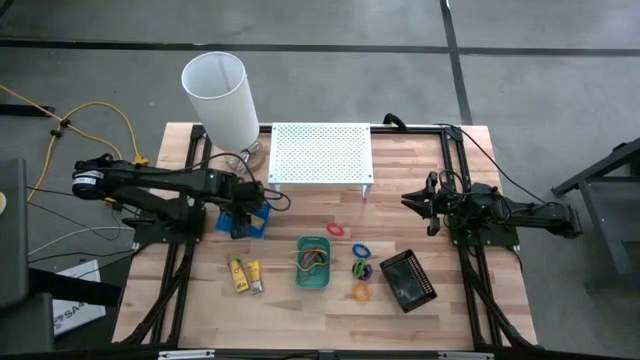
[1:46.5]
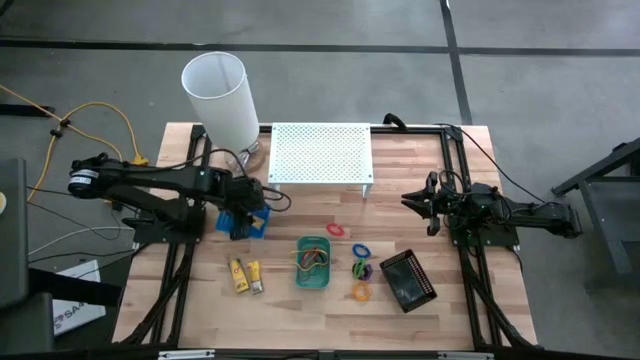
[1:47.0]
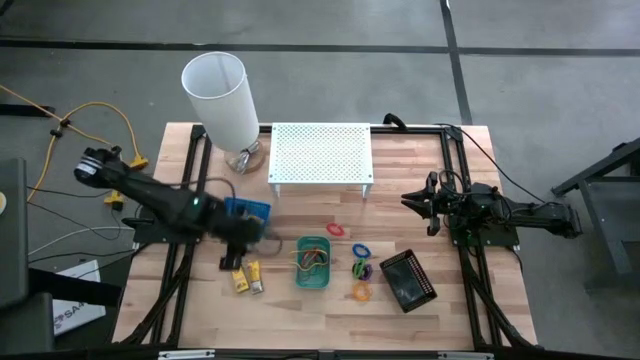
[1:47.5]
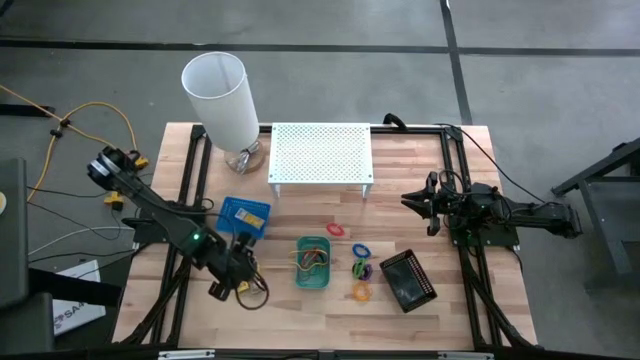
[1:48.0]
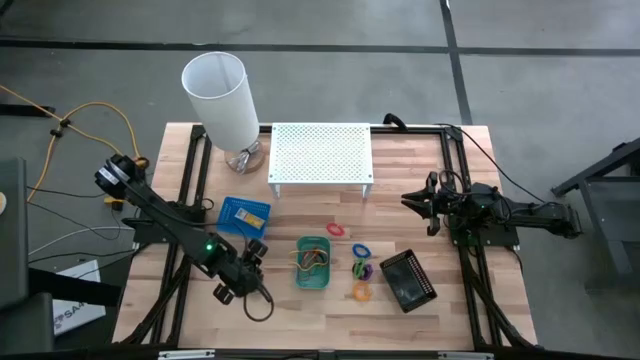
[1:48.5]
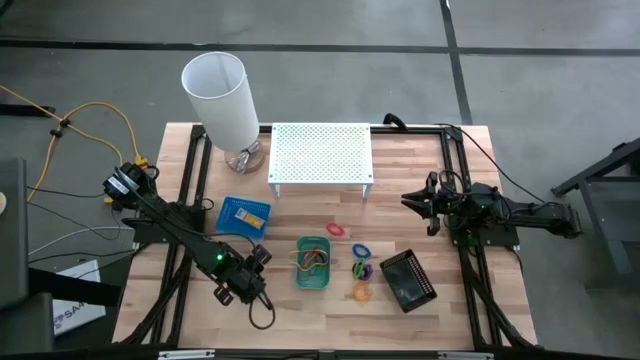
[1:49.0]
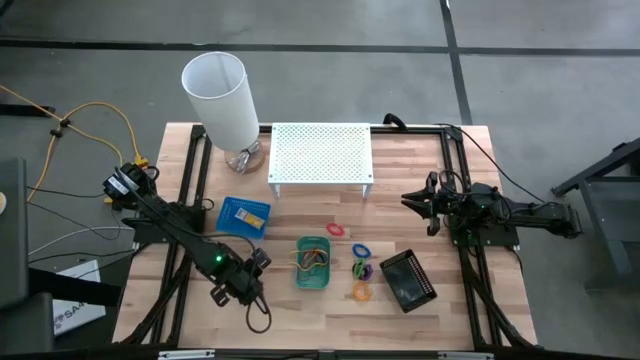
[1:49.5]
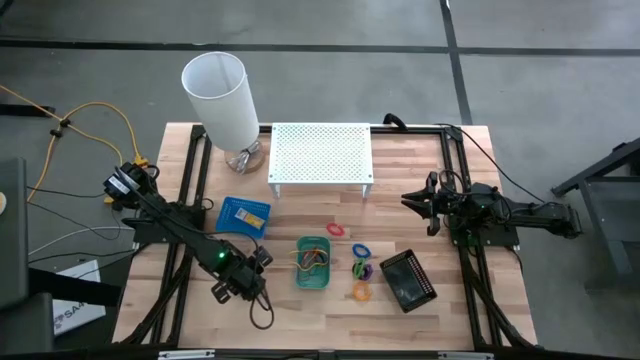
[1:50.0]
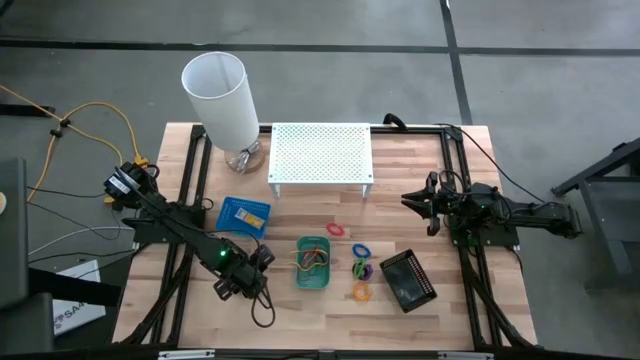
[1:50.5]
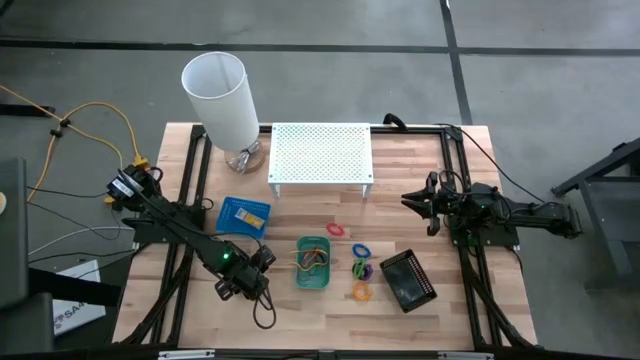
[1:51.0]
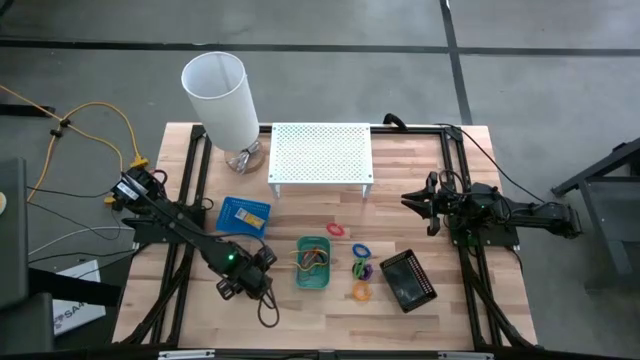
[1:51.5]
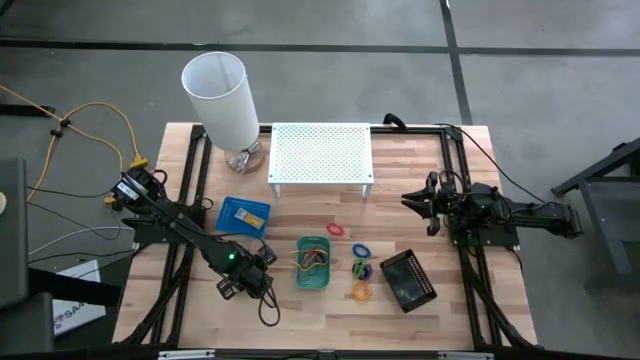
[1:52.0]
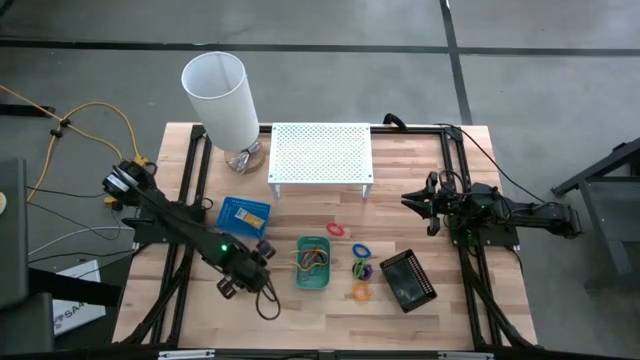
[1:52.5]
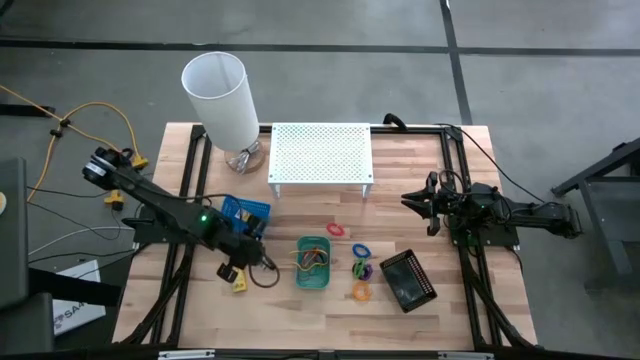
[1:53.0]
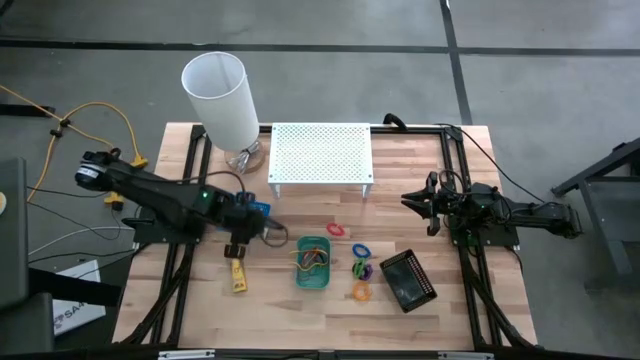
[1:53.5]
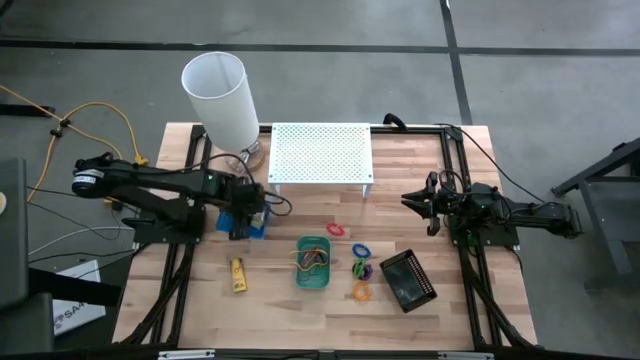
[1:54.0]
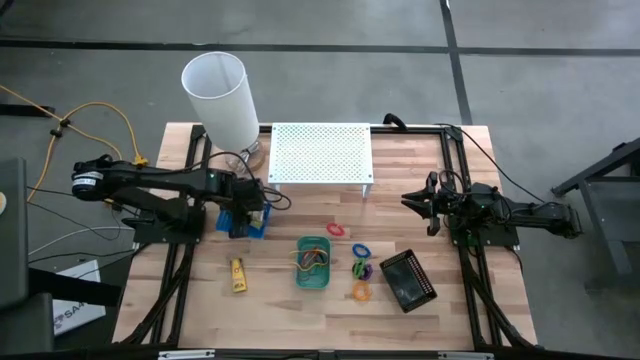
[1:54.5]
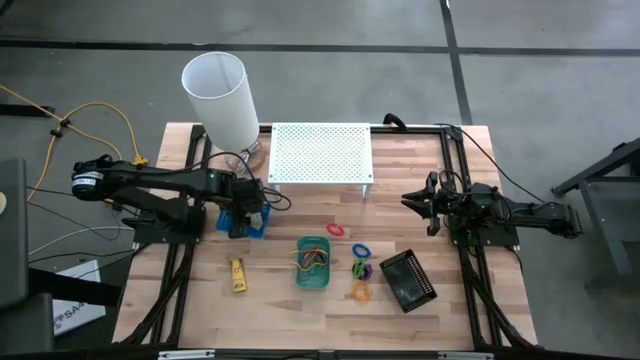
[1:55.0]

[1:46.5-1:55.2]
Task: Pick & Place Office Desk Supplies
Put the yellow crayon box into the blue bin

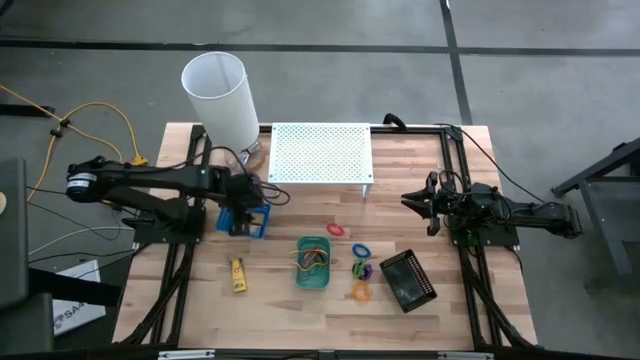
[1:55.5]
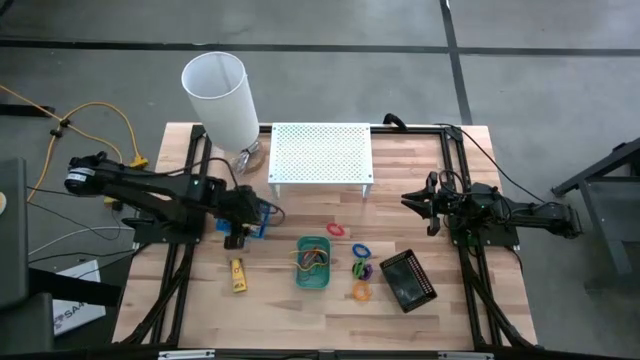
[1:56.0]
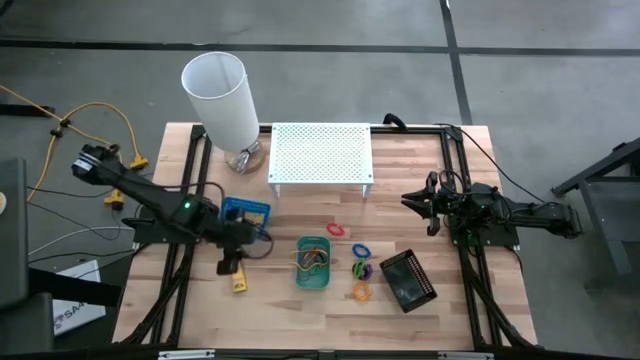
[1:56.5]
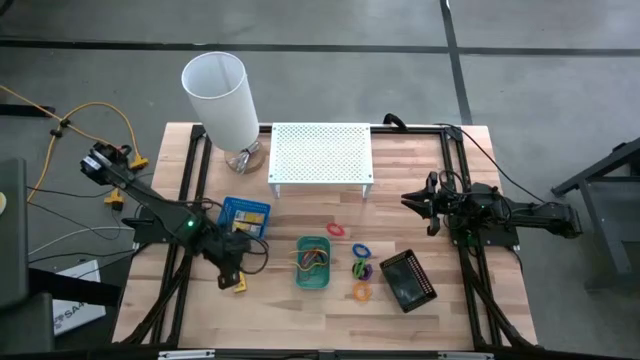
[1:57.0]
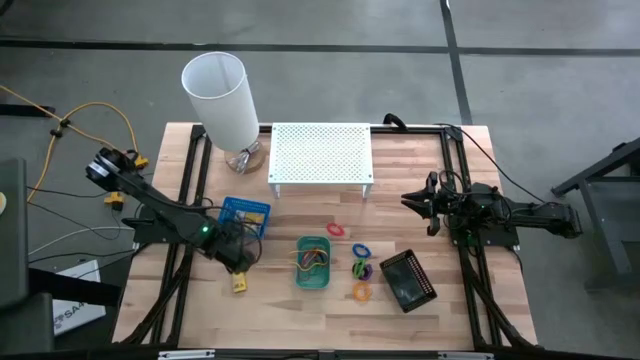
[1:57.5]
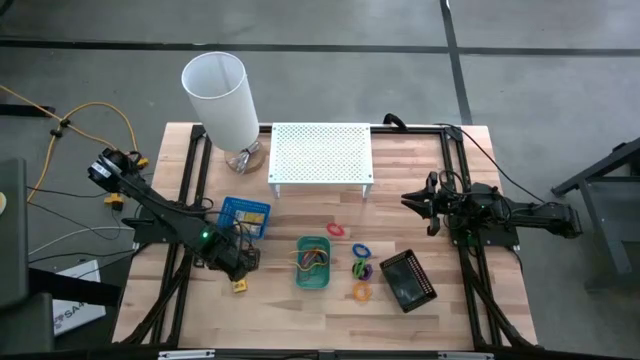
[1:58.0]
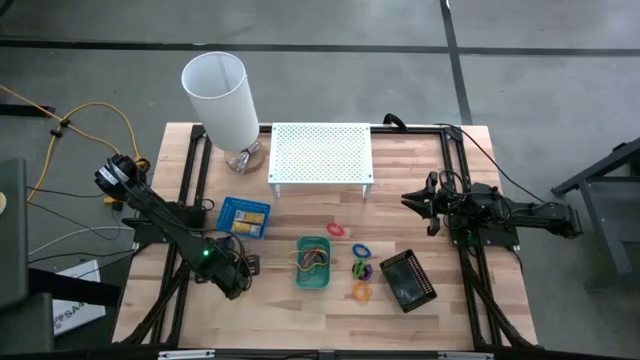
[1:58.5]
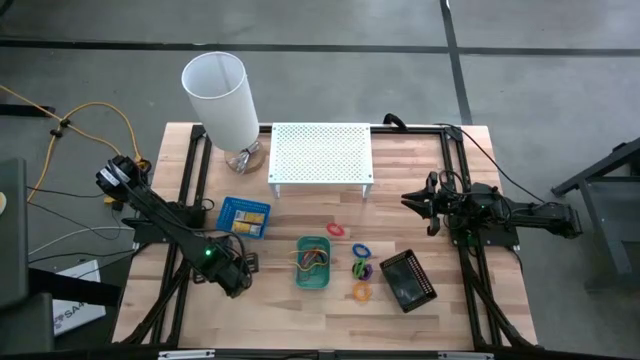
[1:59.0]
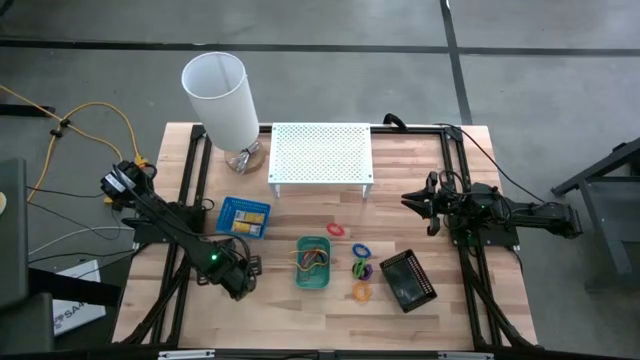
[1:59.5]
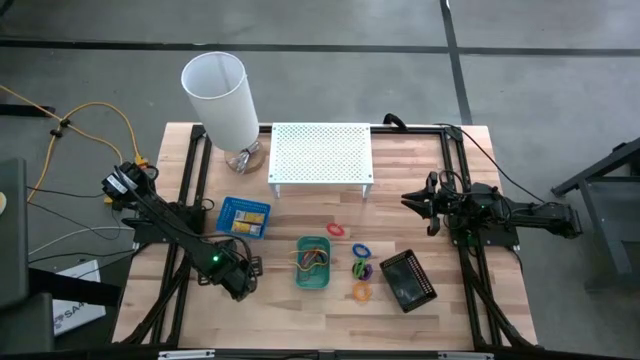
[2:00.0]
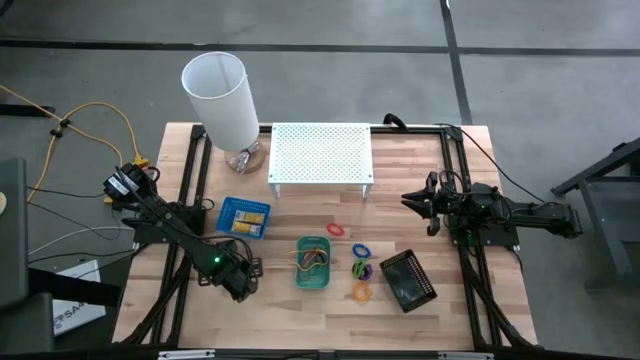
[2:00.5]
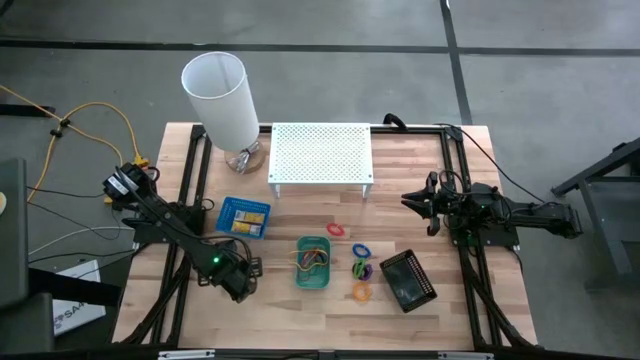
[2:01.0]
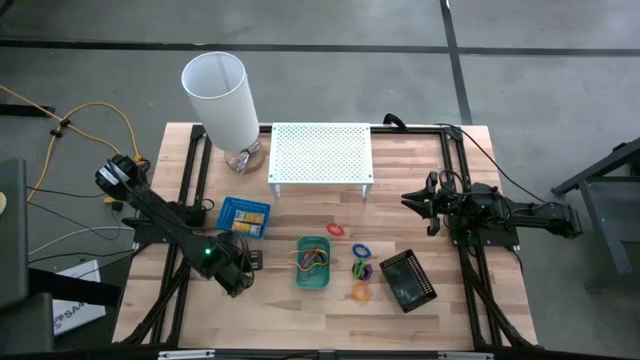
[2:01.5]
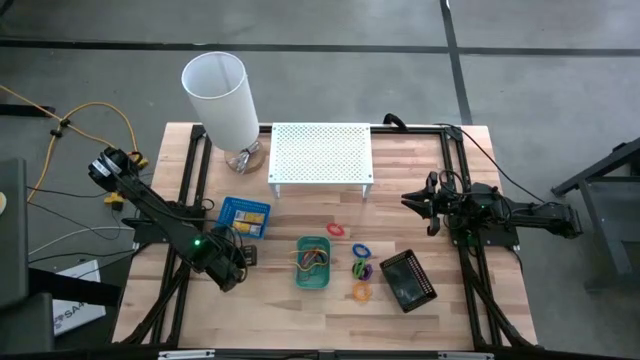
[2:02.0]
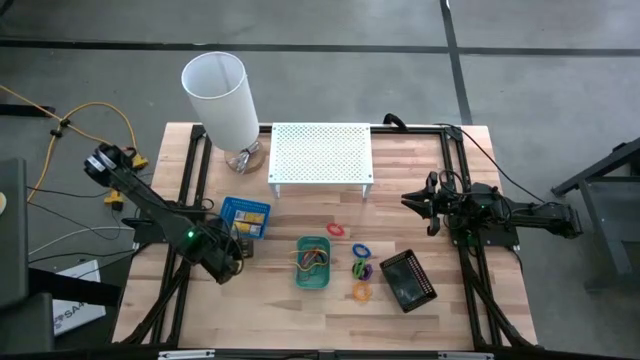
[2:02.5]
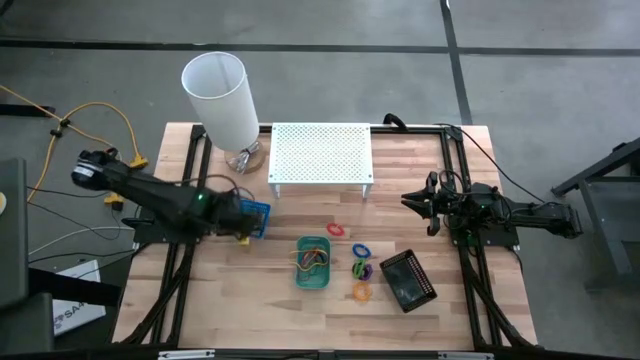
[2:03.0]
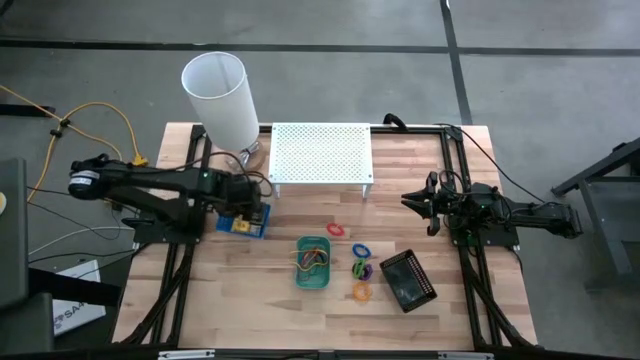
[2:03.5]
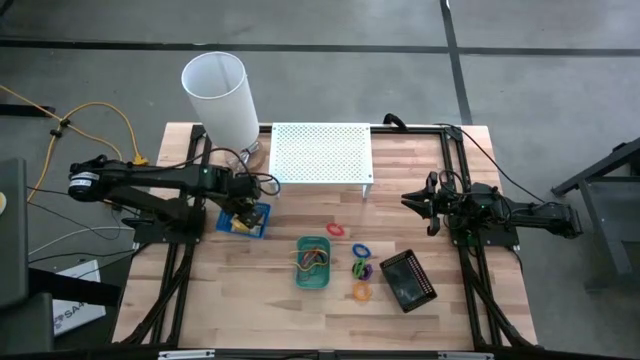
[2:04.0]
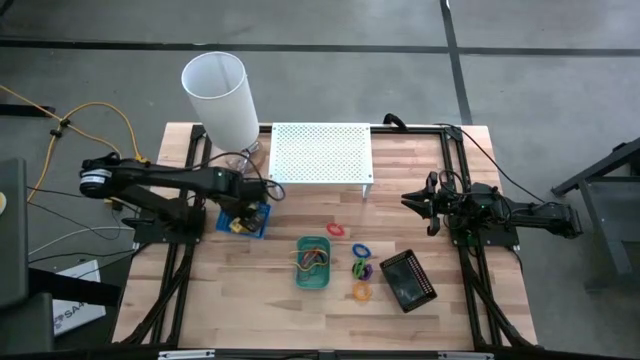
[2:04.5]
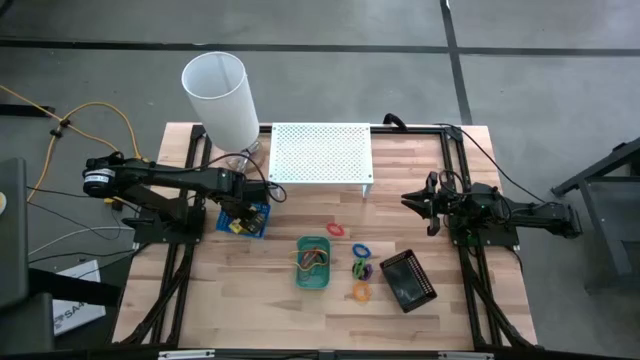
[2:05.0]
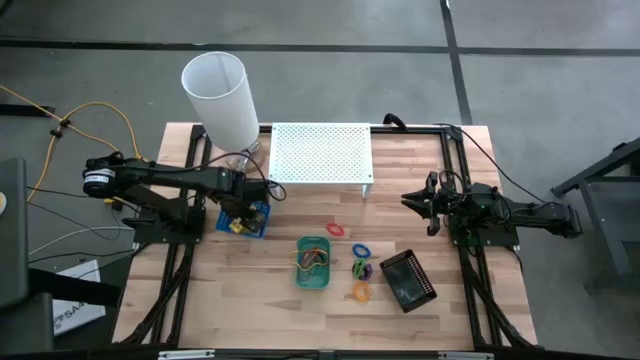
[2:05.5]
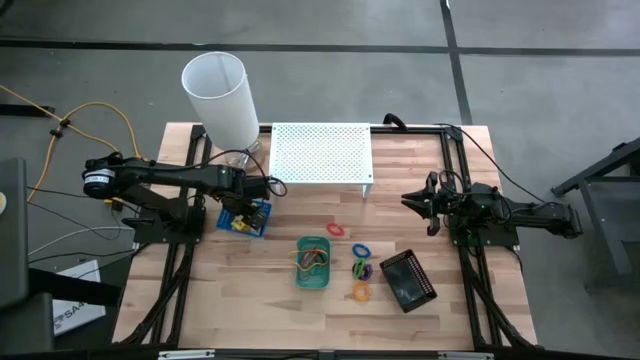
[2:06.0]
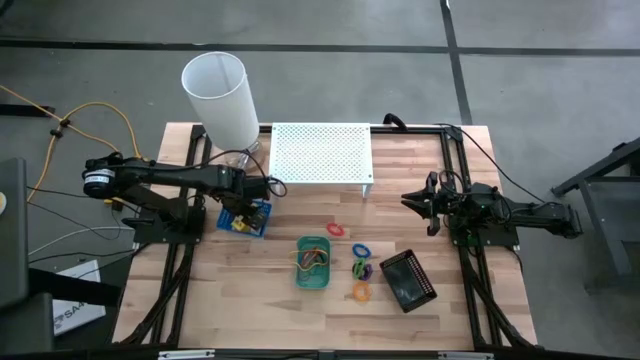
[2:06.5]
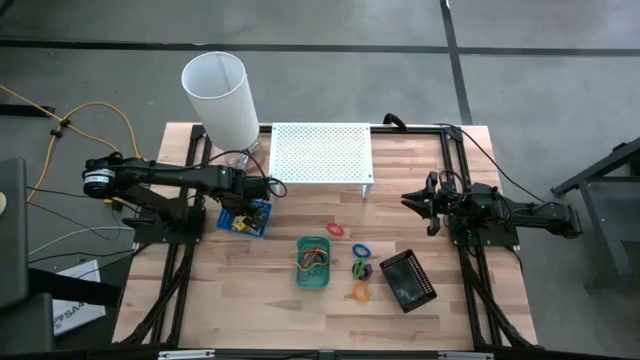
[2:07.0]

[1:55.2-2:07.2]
Put the yellow crayon box into the blue bin
